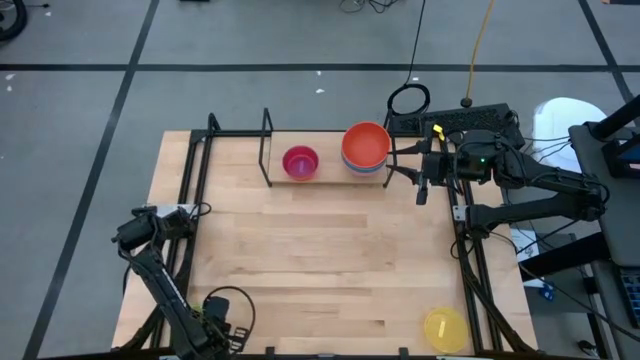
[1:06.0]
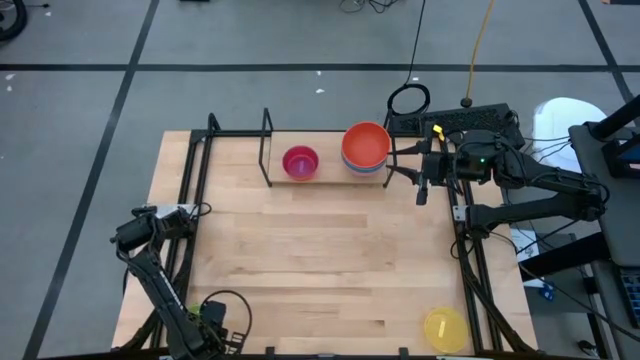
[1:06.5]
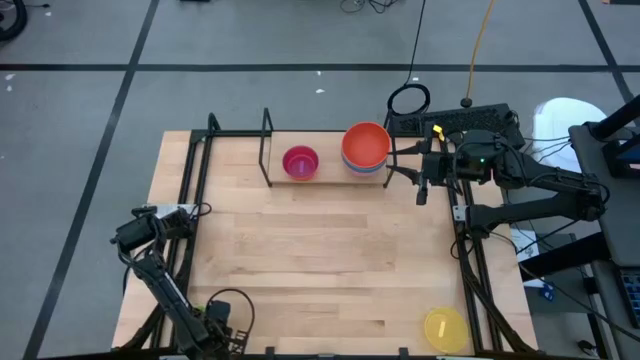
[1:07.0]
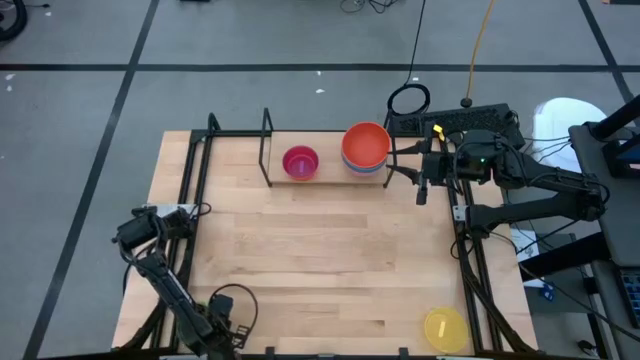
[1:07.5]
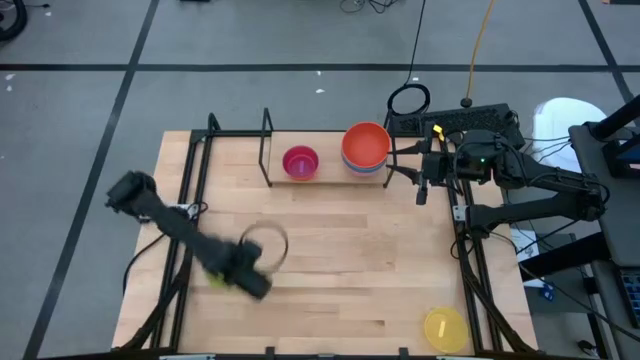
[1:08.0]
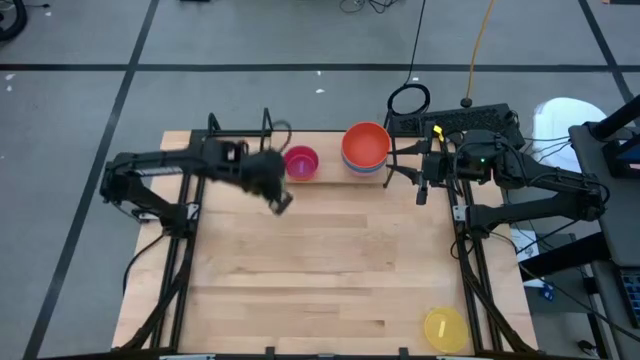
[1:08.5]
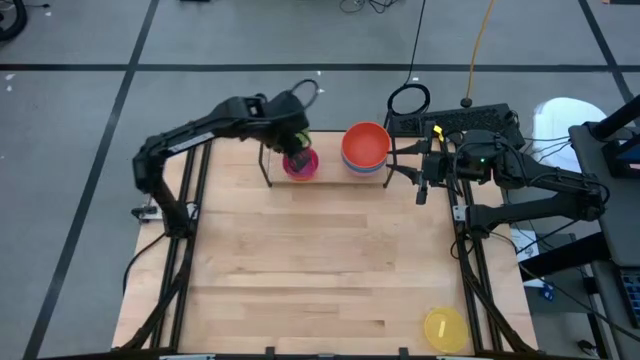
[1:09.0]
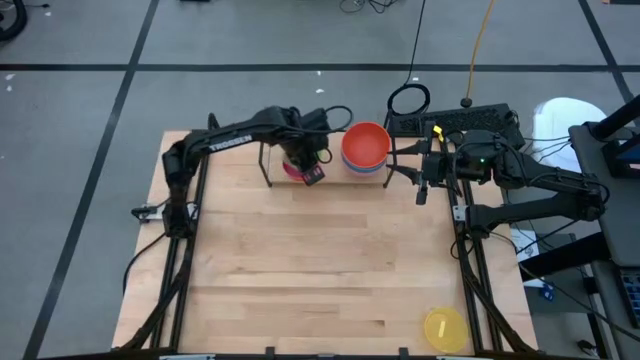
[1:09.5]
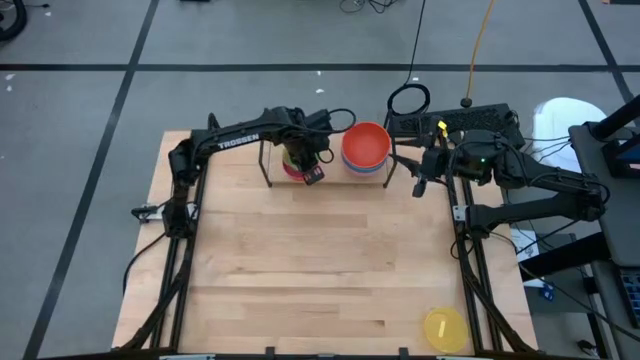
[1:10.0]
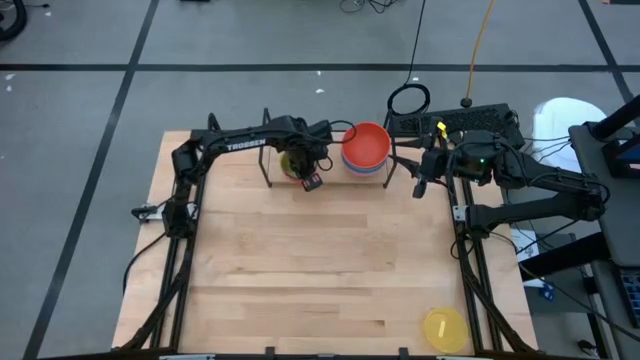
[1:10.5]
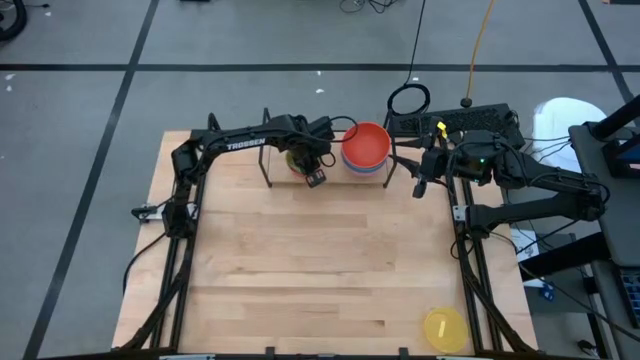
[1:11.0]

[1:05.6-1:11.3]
Task: Place and stack bowls onto a shelf
Stack the green bowl on top of the purple bowl on the shelf

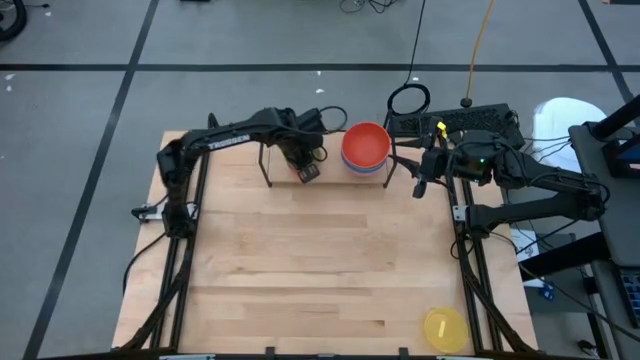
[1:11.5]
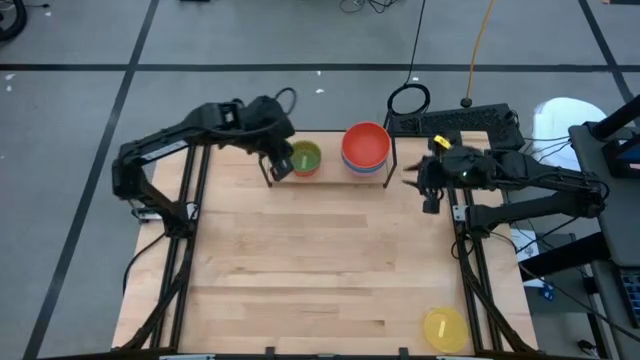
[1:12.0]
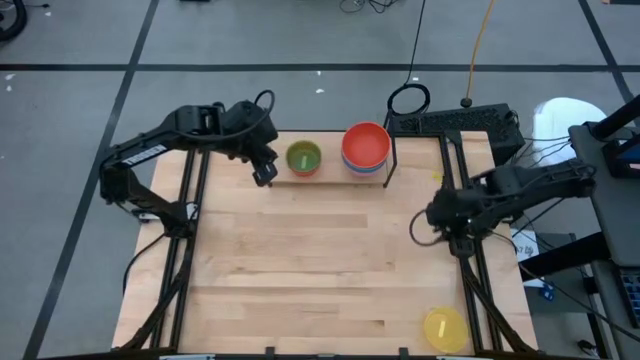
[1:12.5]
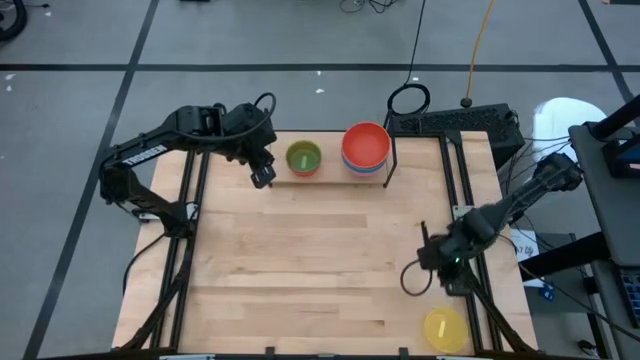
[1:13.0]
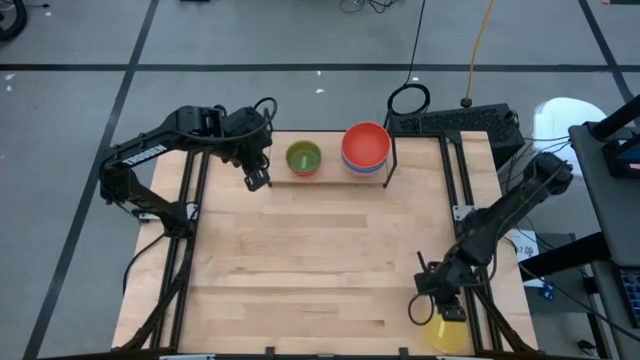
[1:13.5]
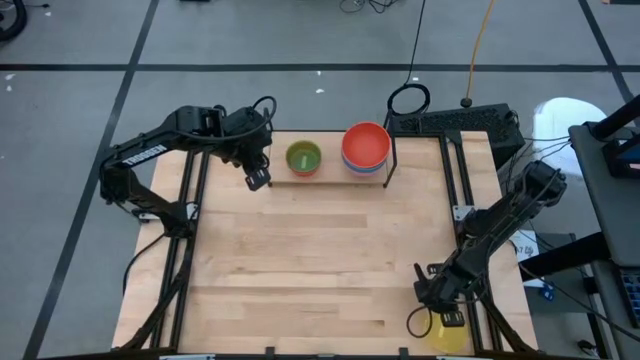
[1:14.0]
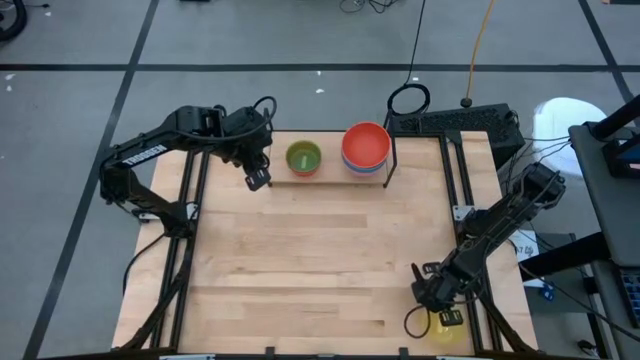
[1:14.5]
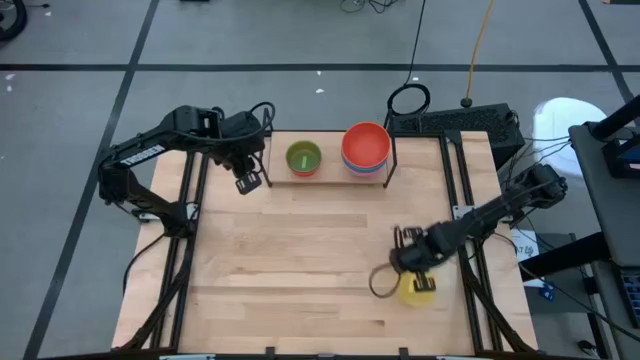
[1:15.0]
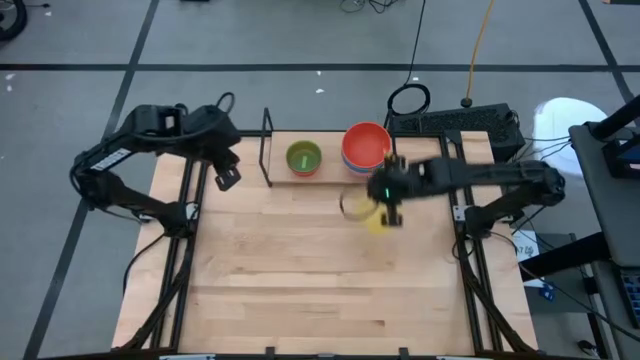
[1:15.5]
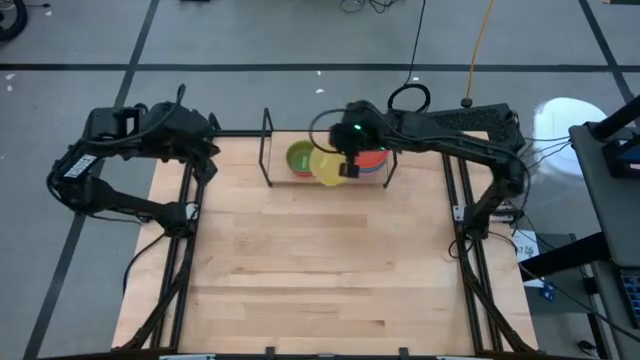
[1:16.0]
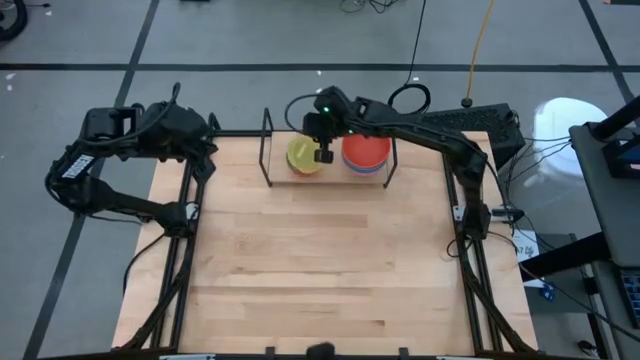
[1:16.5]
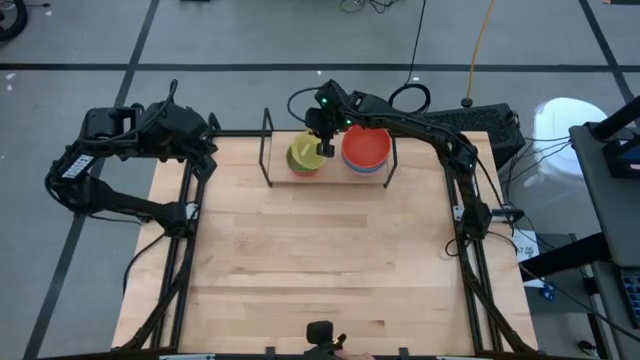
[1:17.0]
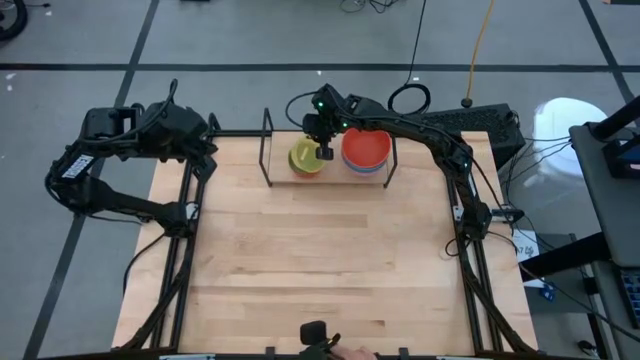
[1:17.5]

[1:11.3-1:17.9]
Stack the yellow bowl on top of the green bowl on the shelf

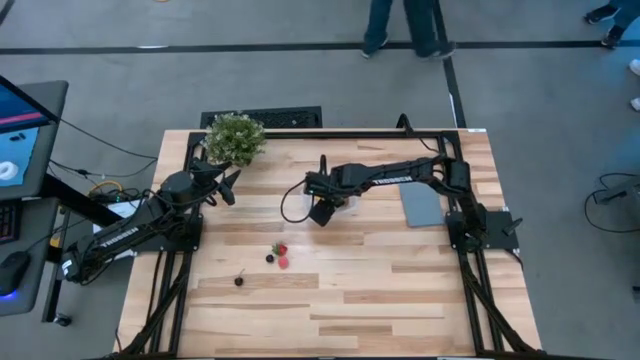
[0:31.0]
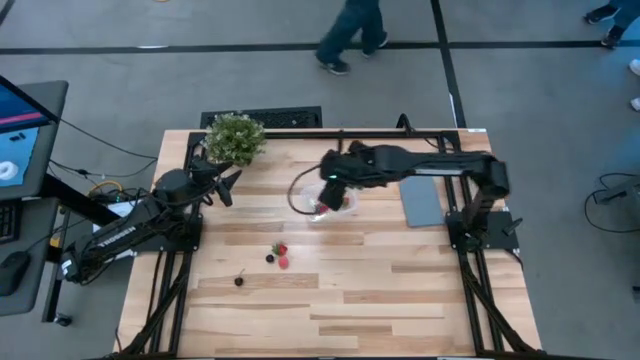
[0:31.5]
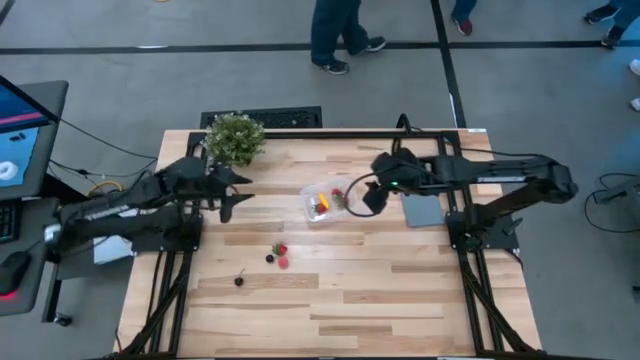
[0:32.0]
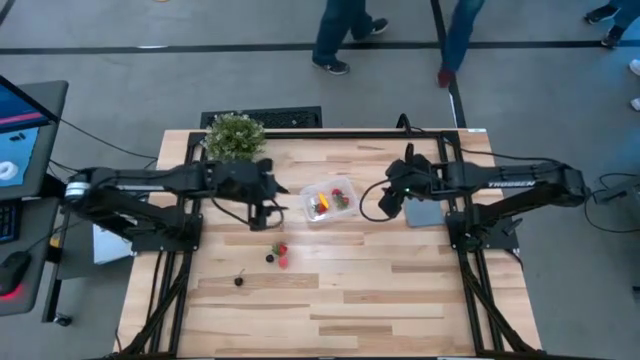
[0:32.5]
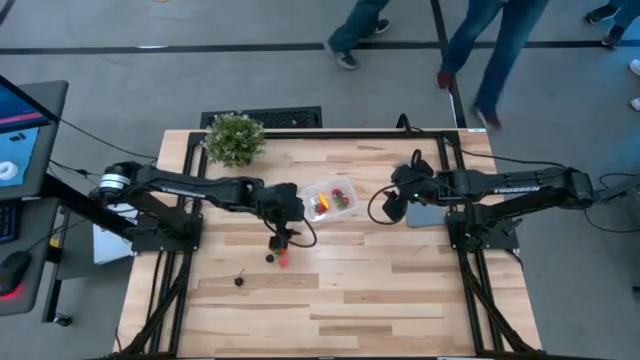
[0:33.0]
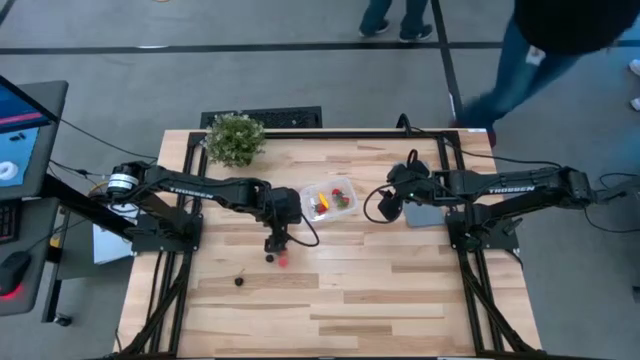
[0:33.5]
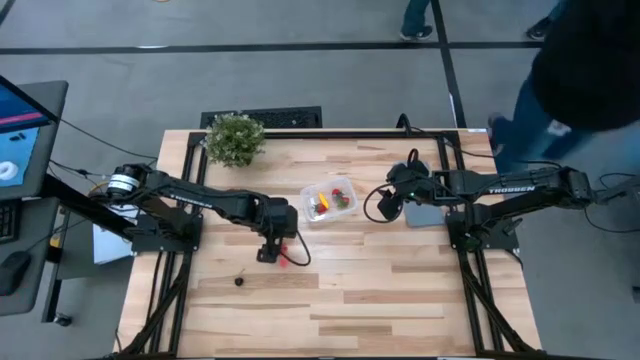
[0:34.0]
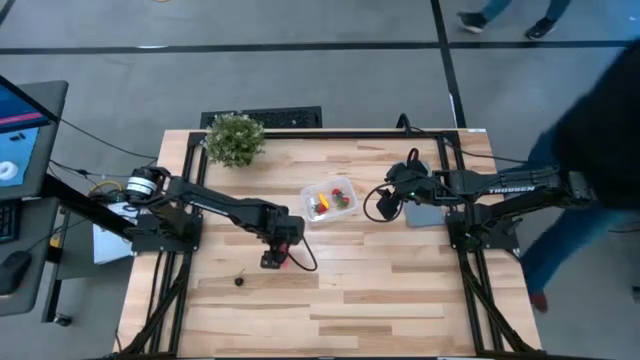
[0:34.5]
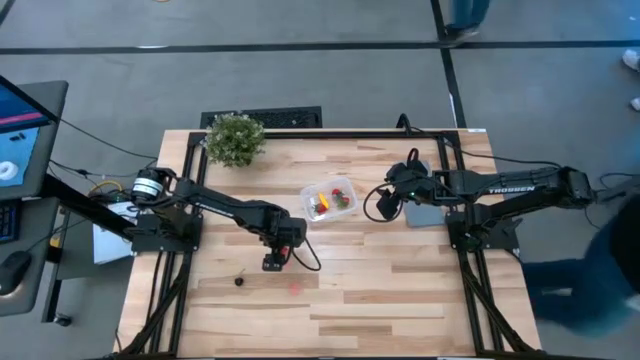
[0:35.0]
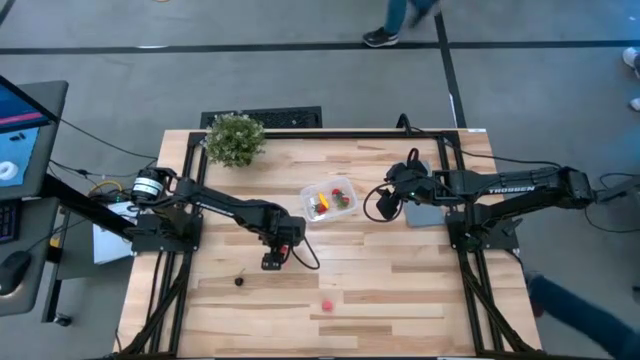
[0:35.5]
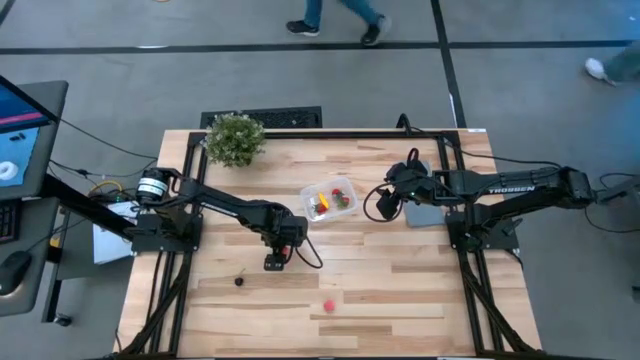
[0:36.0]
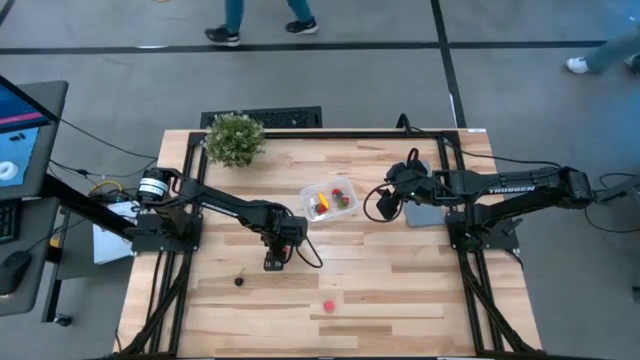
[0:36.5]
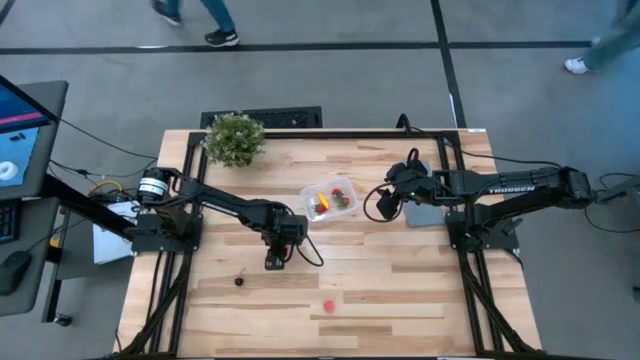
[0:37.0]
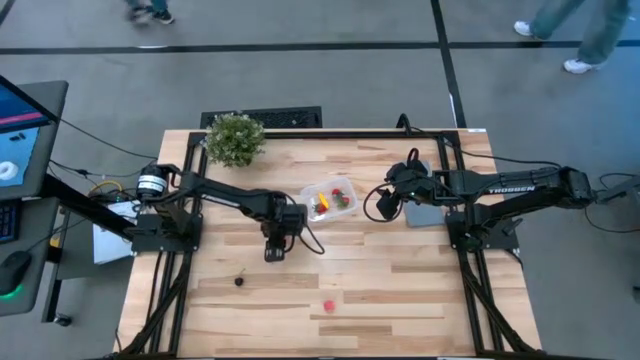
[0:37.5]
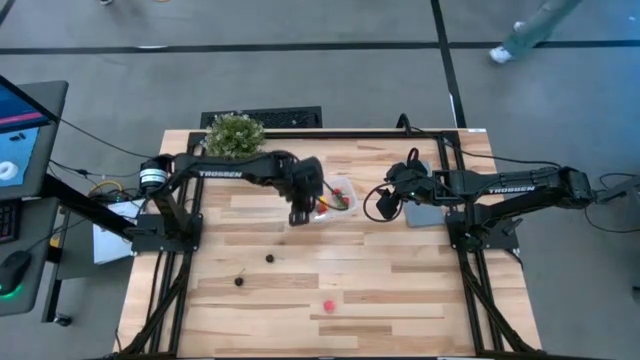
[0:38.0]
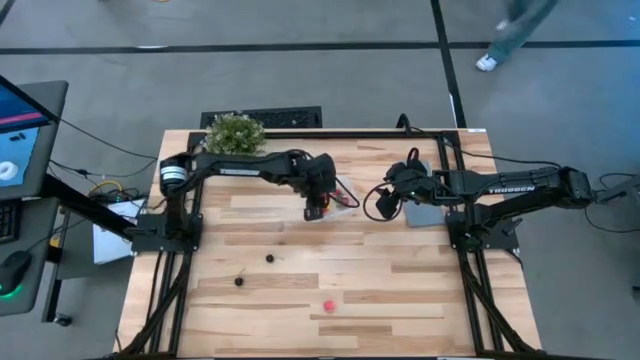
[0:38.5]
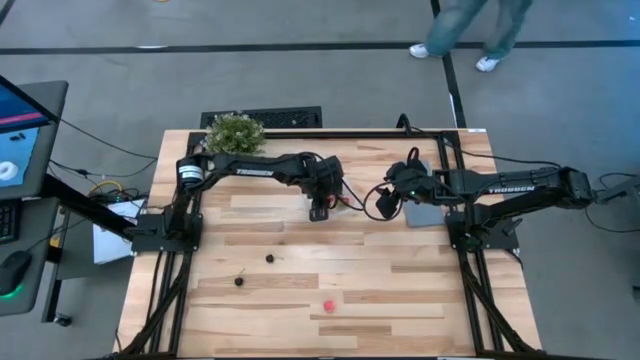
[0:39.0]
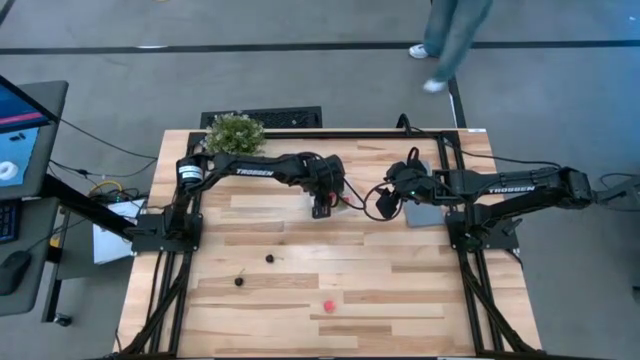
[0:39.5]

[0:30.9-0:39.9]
Task: Pick and placing Produce into tupperware
Put the strawberry into the transparent bin
